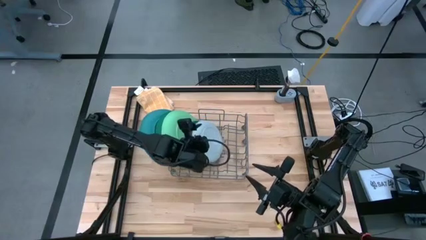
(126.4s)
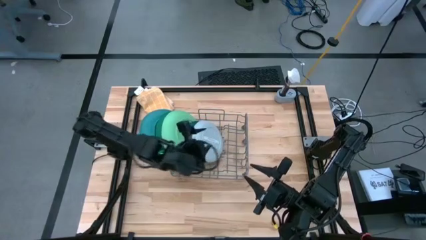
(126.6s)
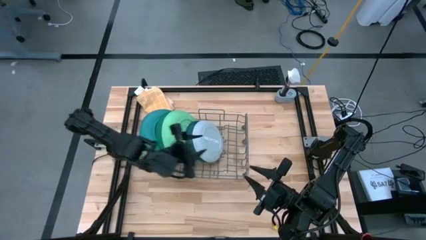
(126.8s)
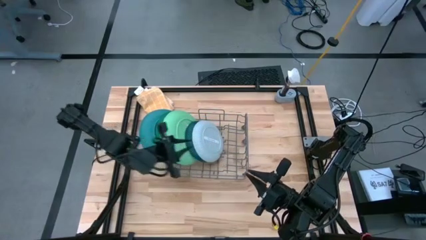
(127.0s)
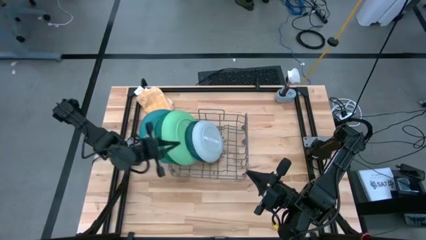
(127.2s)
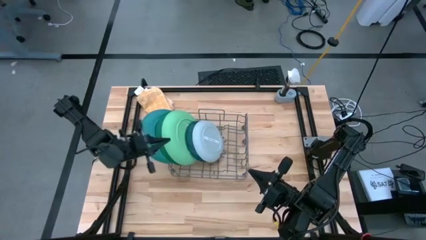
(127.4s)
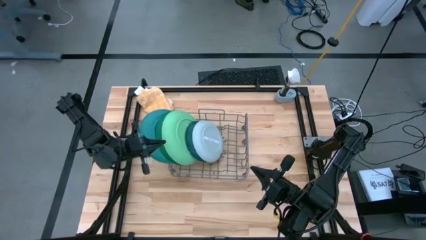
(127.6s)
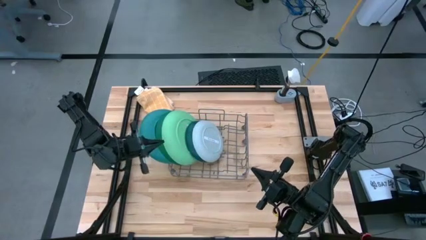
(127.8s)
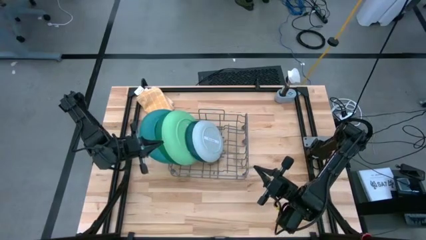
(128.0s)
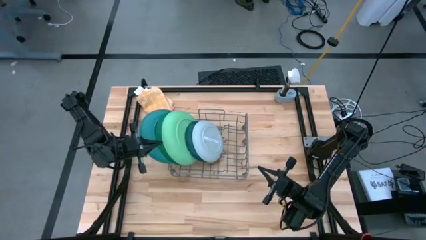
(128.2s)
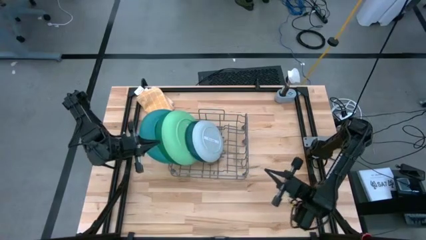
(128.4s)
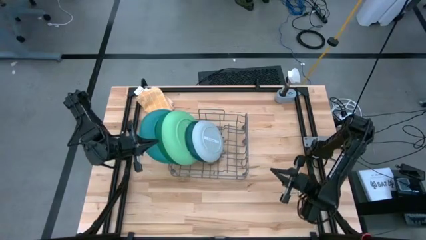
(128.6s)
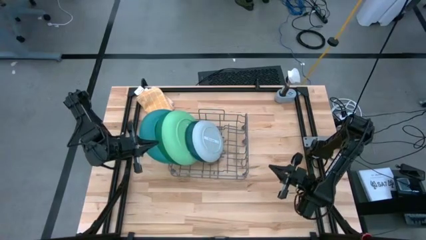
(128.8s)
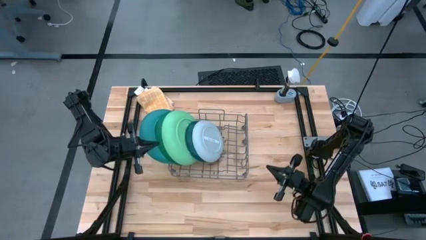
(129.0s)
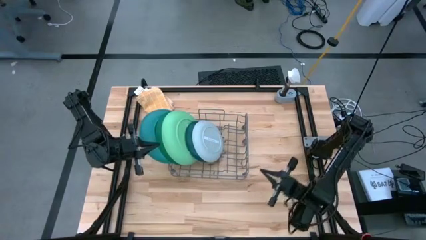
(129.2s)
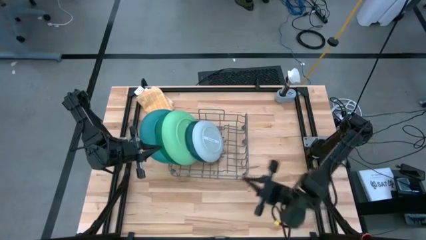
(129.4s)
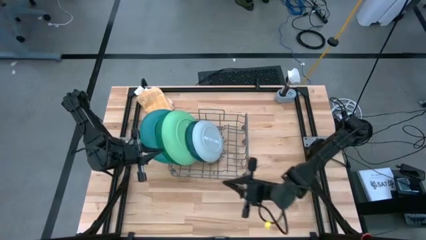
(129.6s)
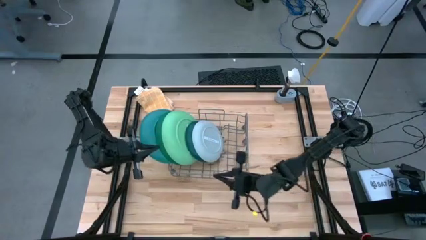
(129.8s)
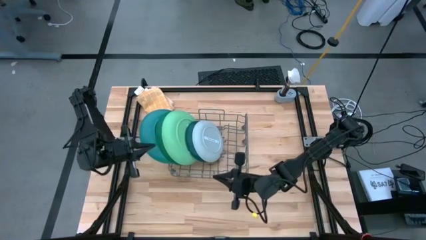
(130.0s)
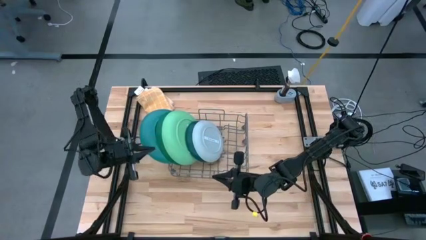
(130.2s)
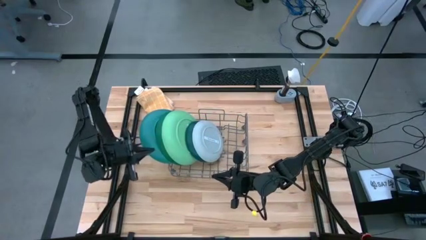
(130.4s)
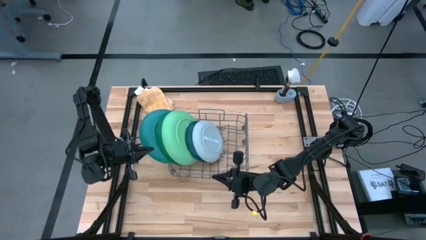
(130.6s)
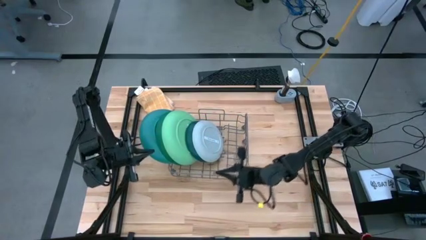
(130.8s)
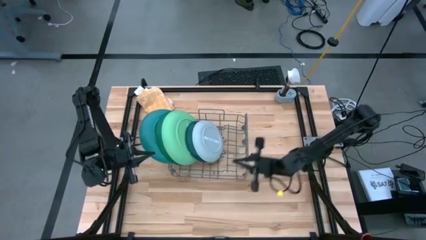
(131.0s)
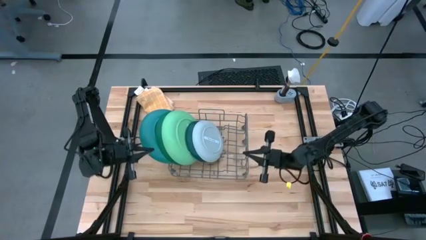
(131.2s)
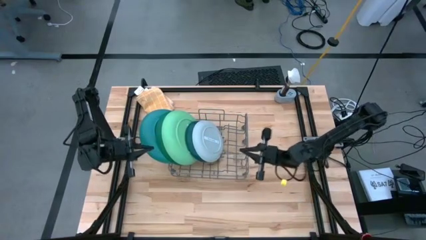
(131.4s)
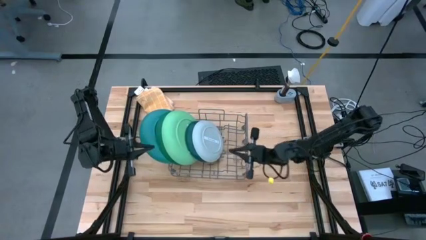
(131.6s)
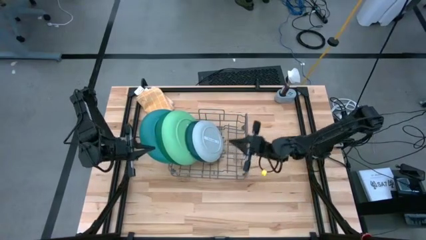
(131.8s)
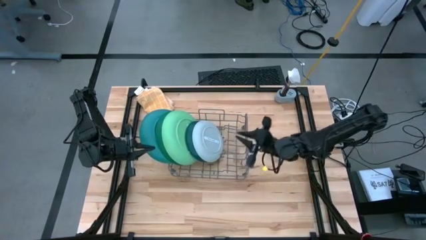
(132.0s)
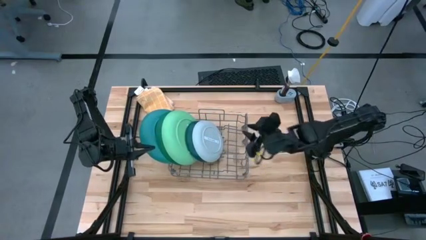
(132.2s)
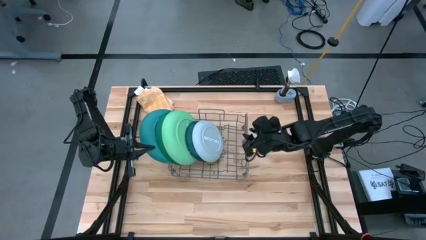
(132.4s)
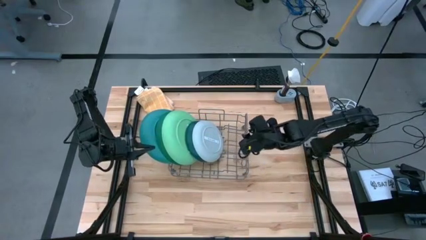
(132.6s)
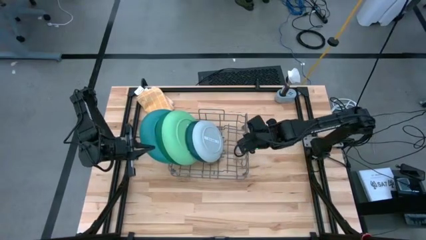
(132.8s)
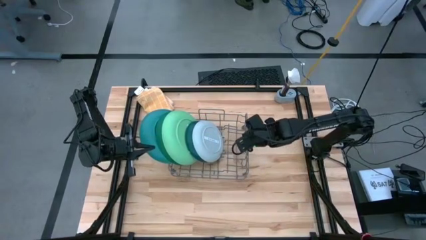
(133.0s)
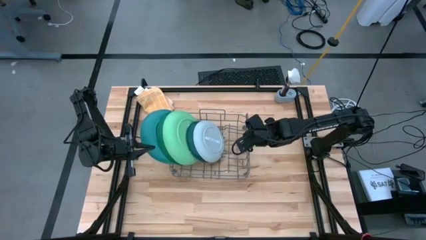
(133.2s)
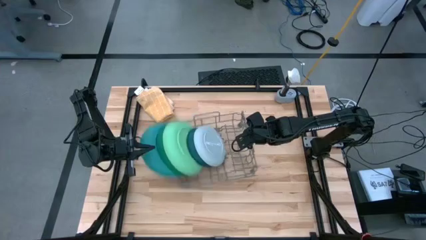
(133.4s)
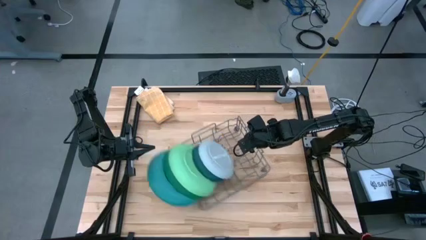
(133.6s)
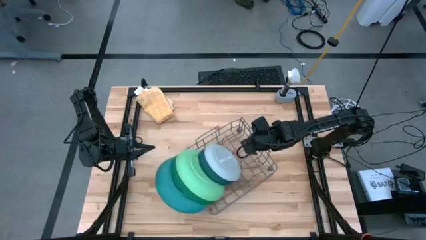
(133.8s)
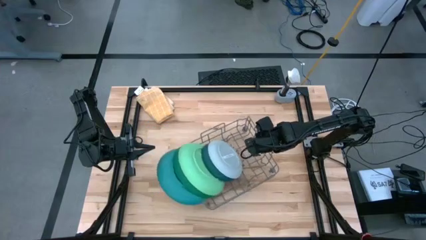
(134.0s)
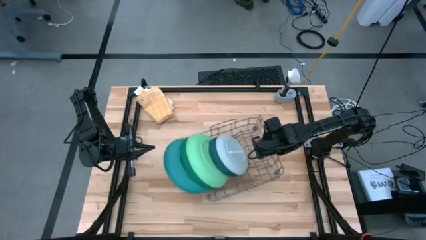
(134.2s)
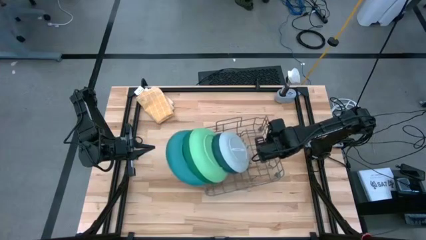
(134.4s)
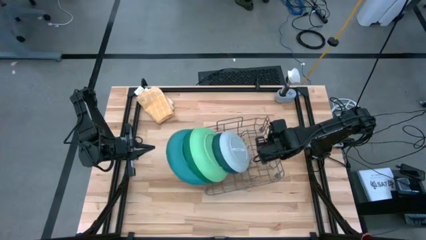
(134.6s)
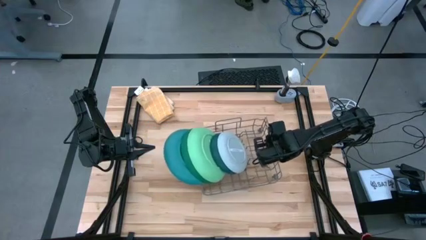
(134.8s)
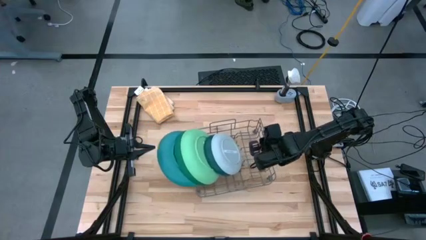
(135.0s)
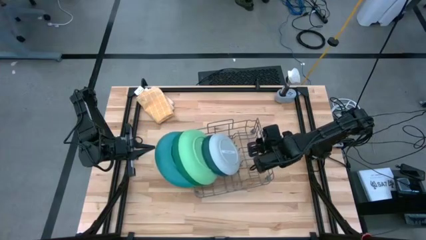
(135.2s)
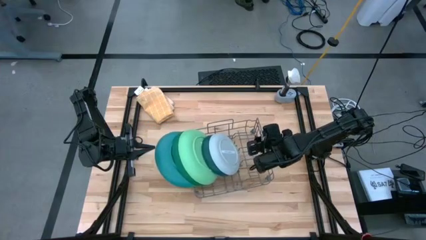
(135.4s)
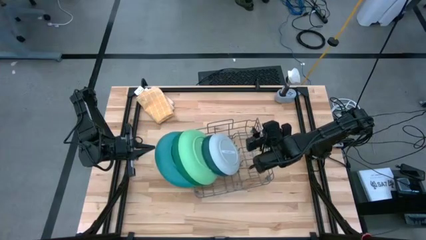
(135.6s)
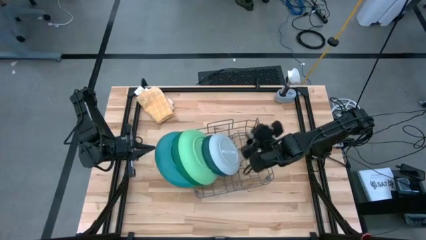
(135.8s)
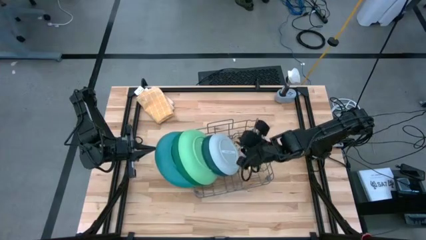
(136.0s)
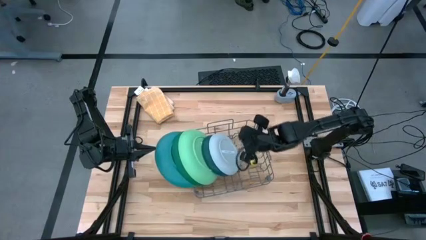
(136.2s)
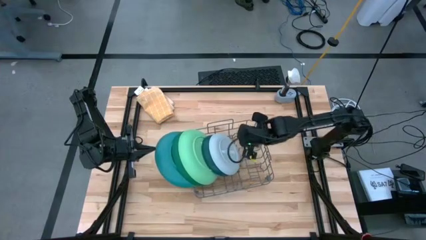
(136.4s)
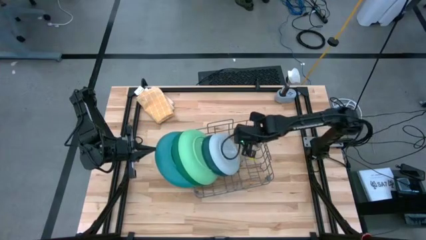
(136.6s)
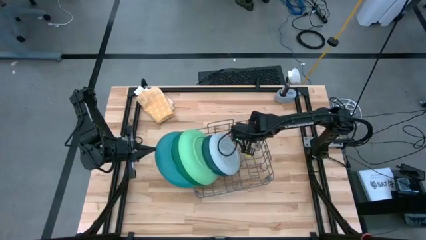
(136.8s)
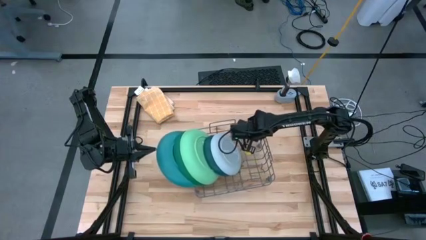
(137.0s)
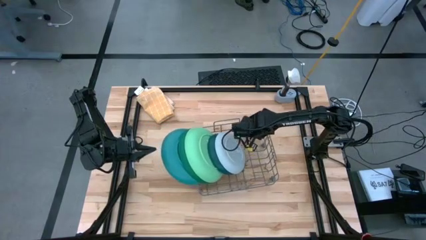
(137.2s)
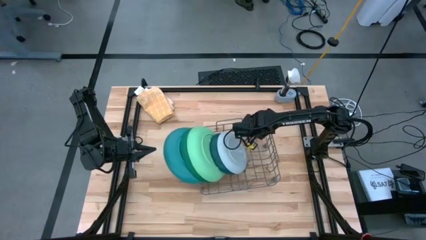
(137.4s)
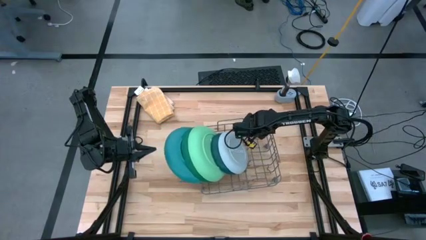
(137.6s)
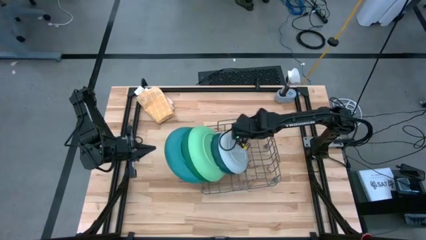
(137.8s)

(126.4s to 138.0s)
Task: Sort dishes
Adjust the dishwasher rack
